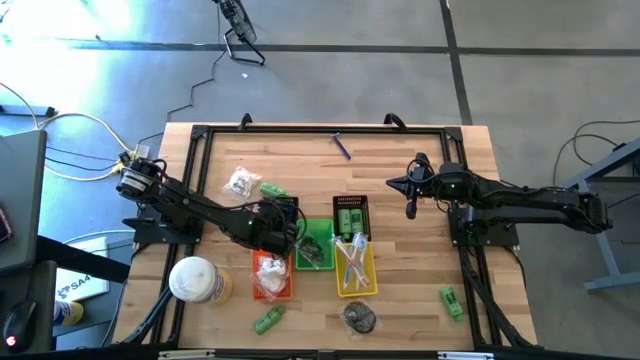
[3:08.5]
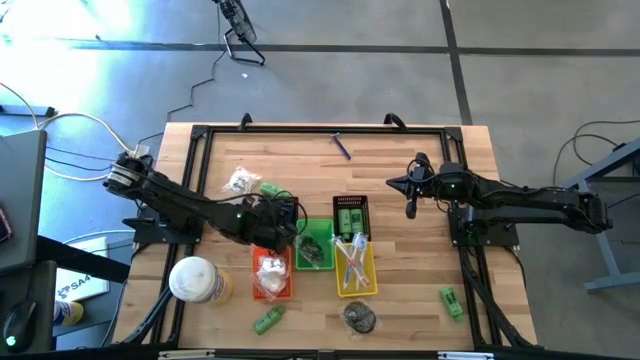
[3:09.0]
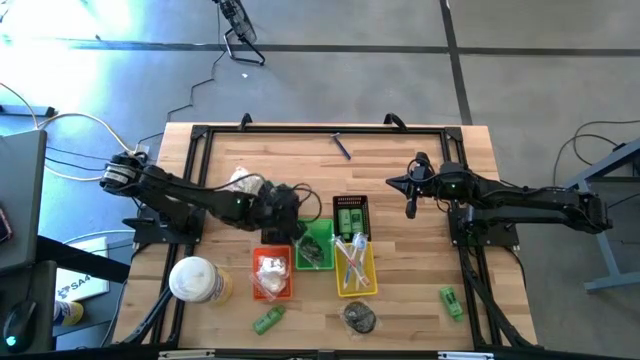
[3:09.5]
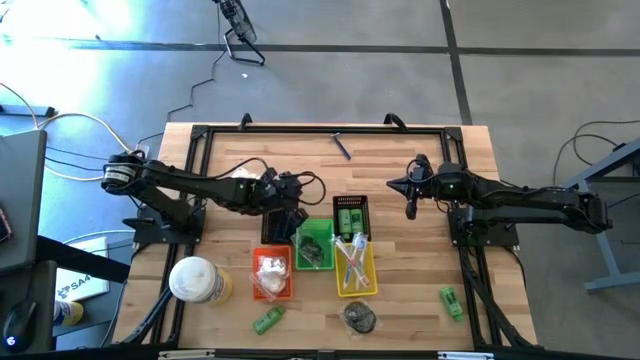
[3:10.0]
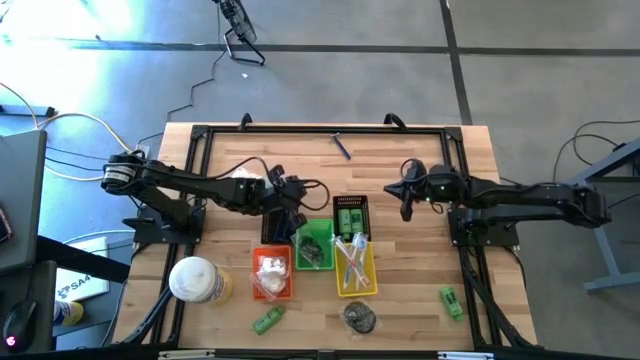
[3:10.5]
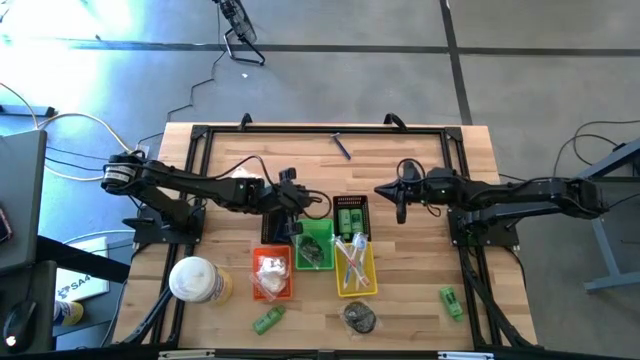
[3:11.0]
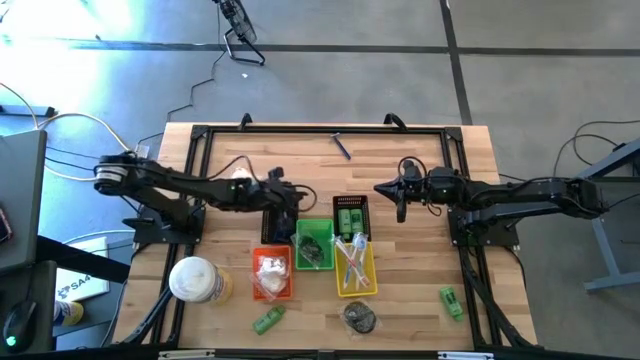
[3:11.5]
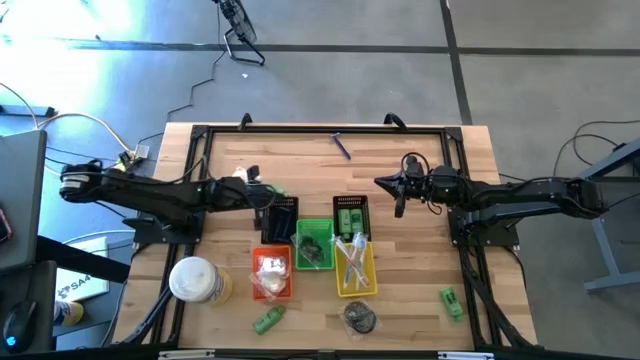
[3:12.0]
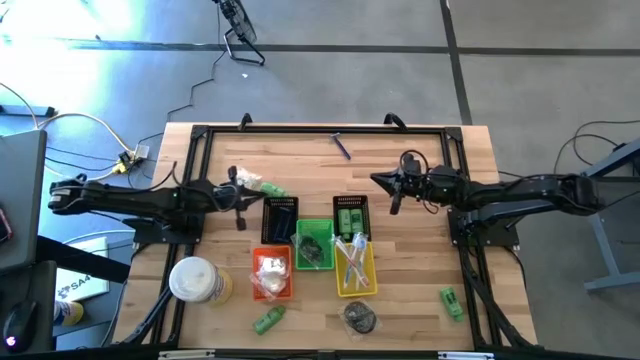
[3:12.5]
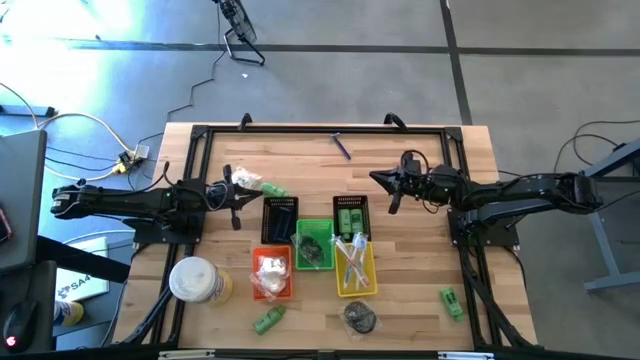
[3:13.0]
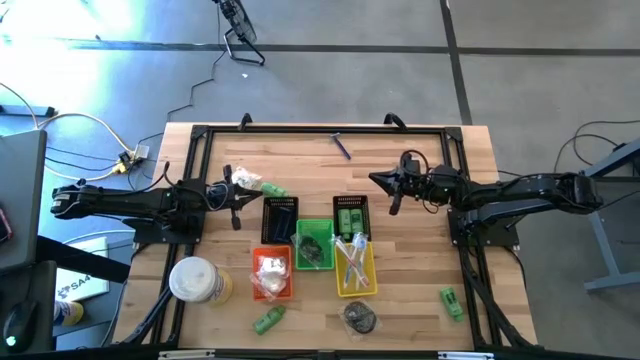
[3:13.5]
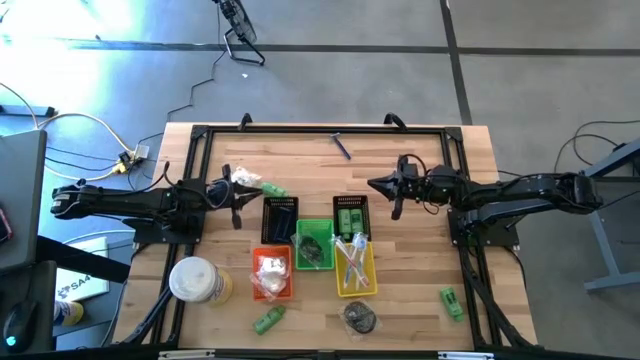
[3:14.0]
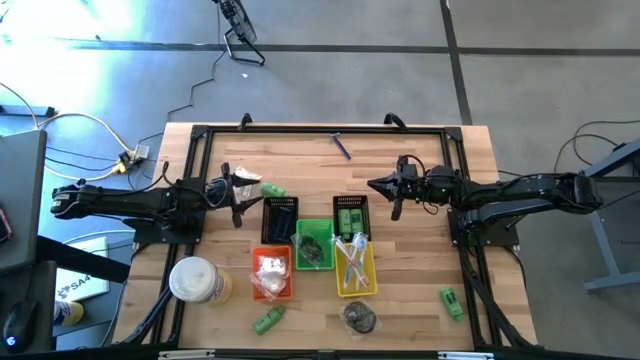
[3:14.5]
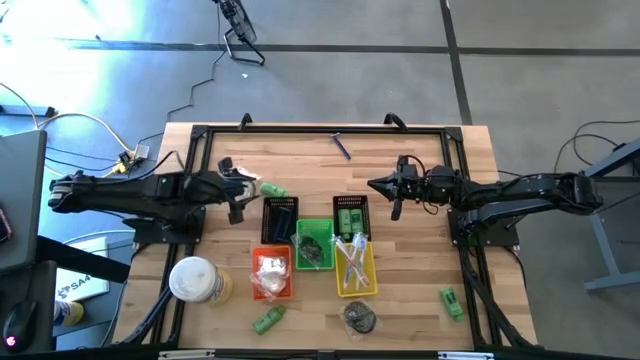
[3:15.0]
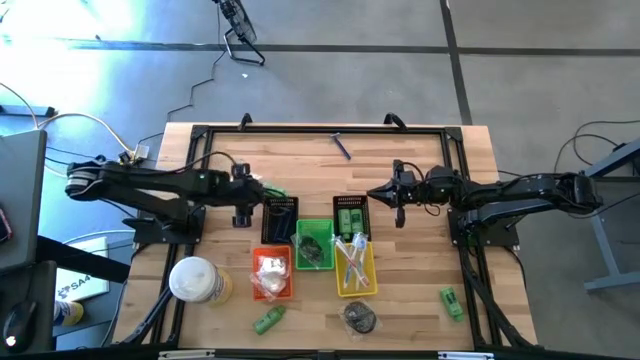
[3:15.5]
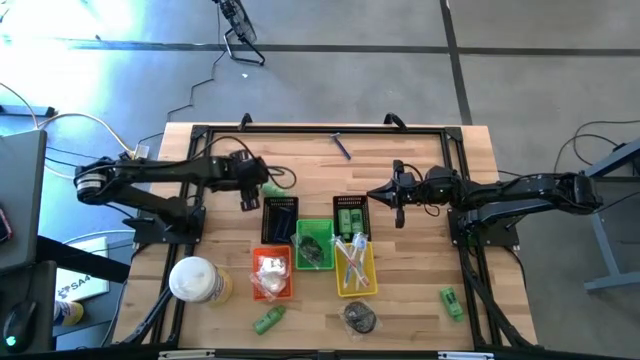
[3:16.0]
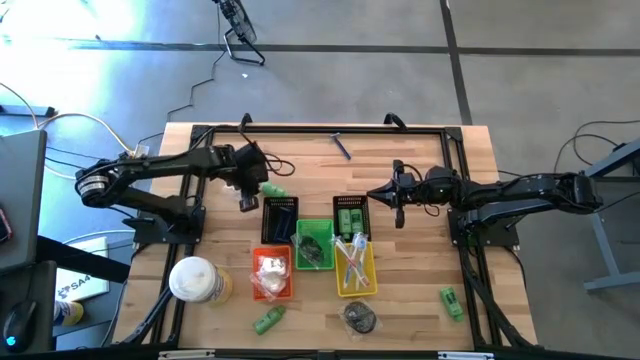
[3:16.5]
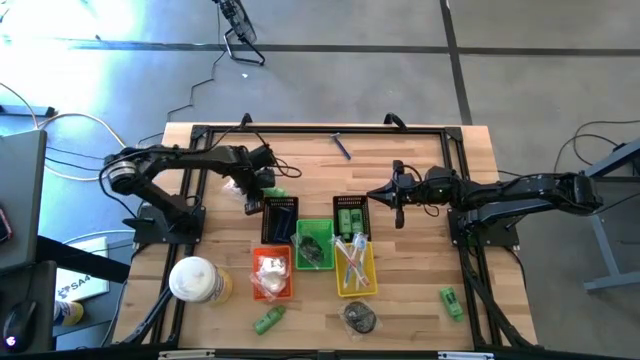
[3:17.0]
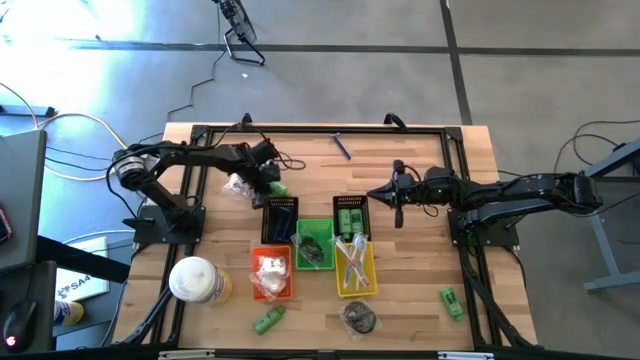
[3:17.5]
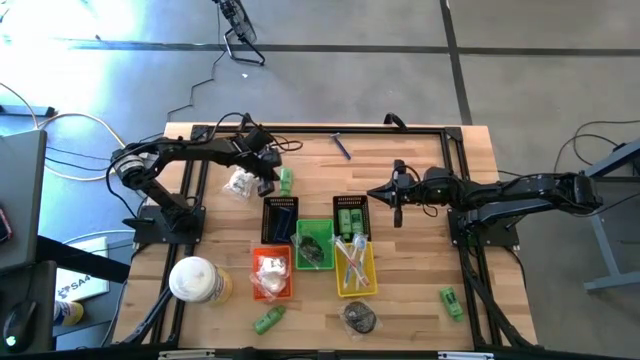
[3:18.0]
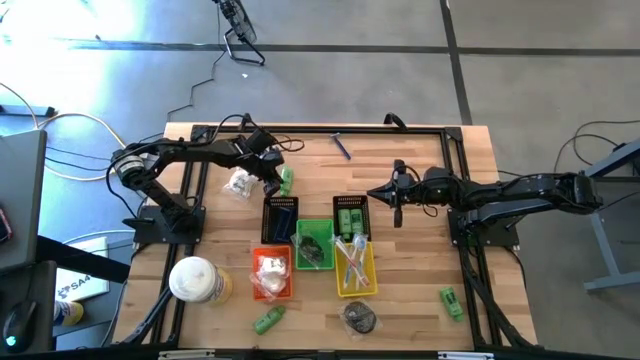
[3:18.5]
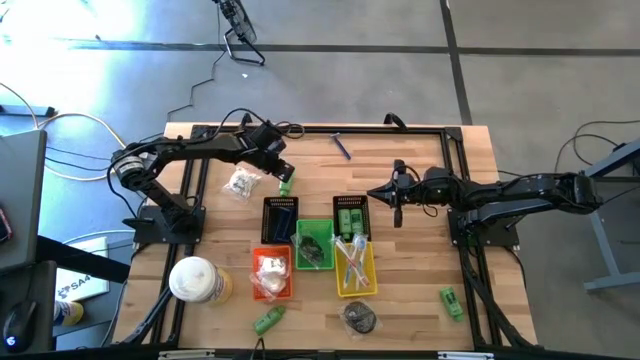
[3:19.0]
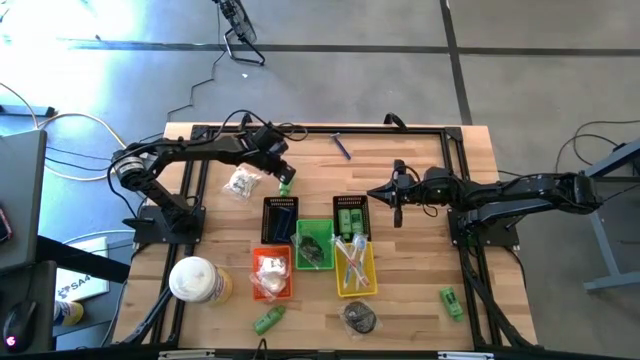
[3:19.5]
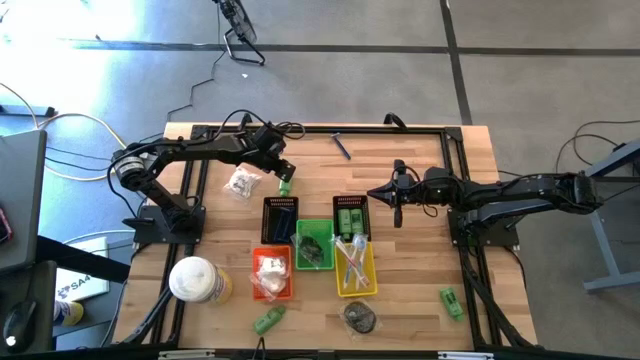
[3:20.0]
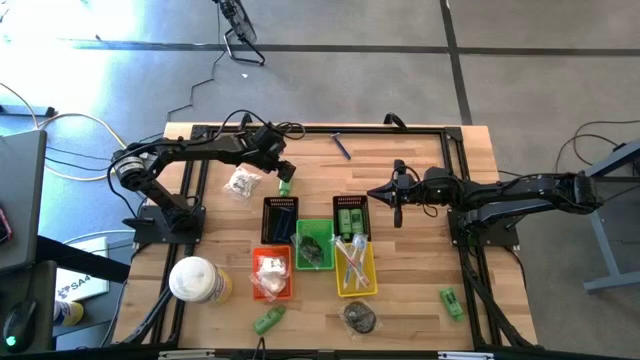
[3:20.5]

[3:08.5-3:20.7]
Task: Pick & Place Travel size toiletries
Put the green shampoo into the right black bin

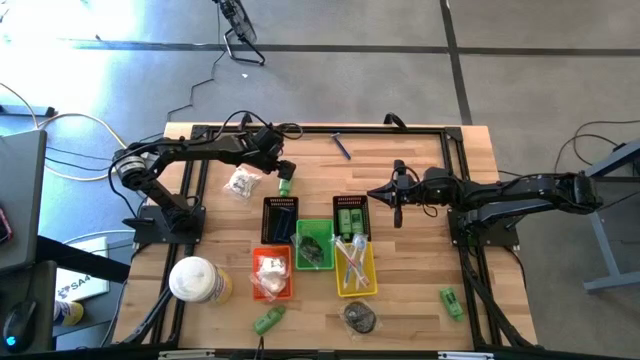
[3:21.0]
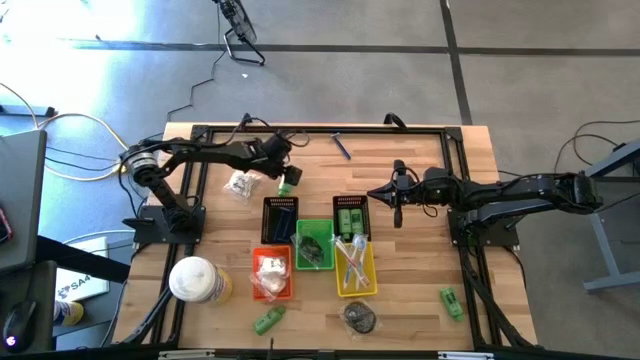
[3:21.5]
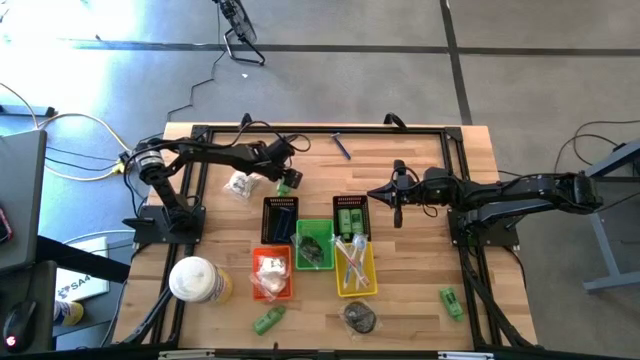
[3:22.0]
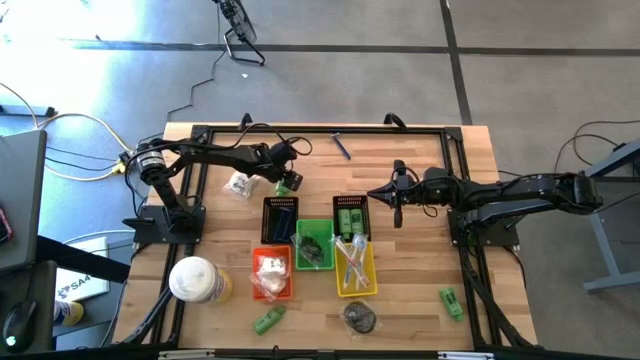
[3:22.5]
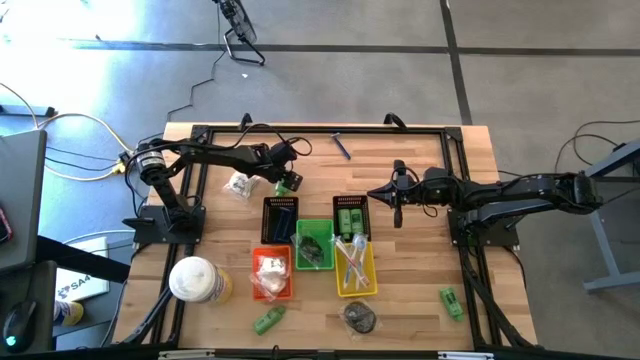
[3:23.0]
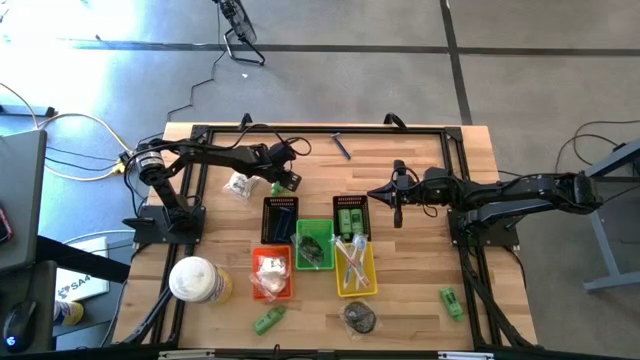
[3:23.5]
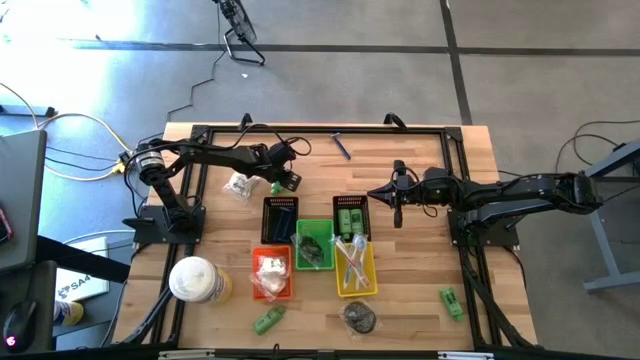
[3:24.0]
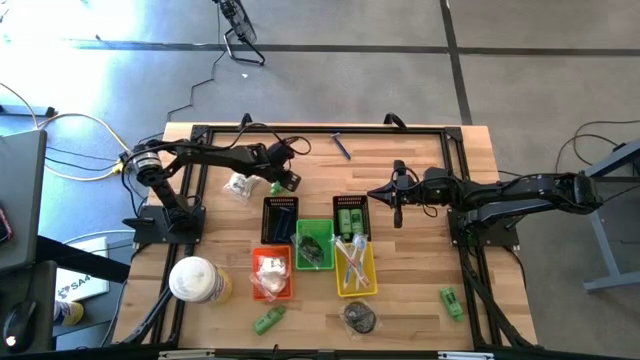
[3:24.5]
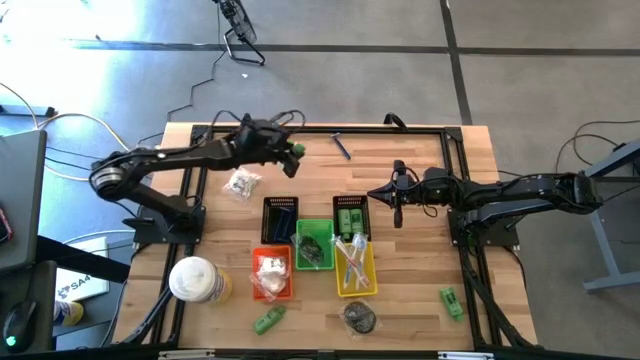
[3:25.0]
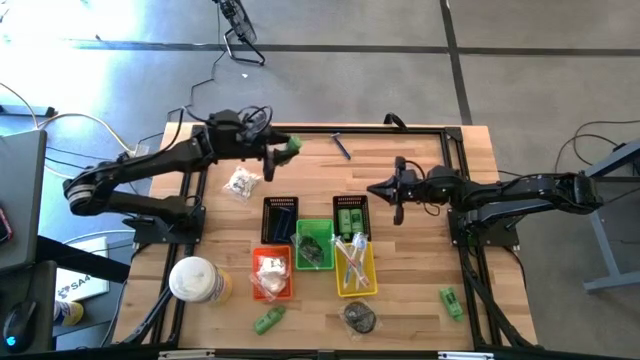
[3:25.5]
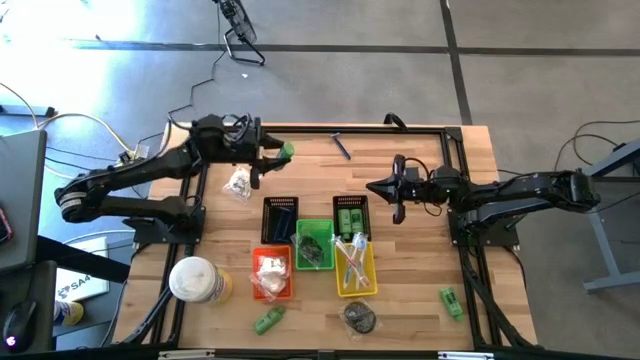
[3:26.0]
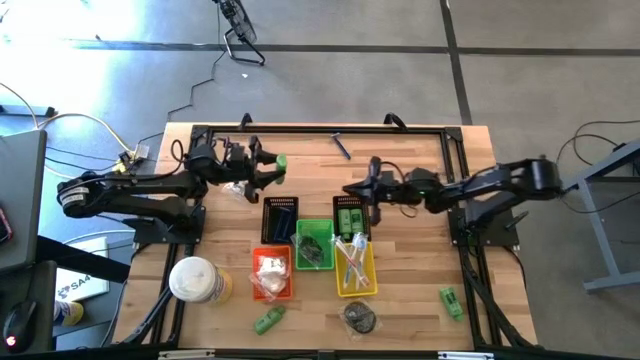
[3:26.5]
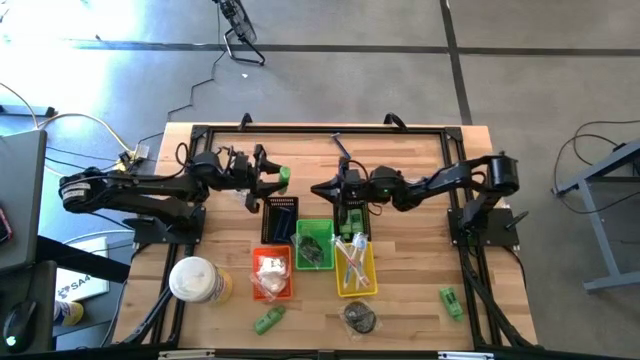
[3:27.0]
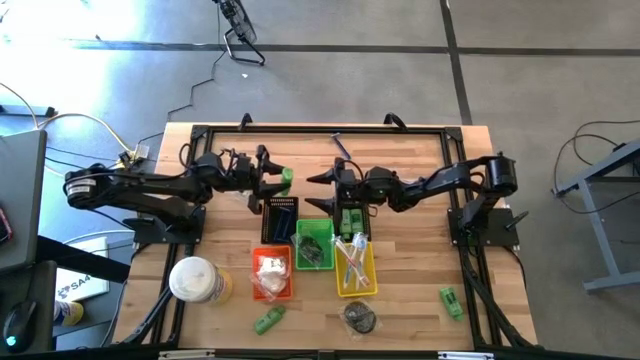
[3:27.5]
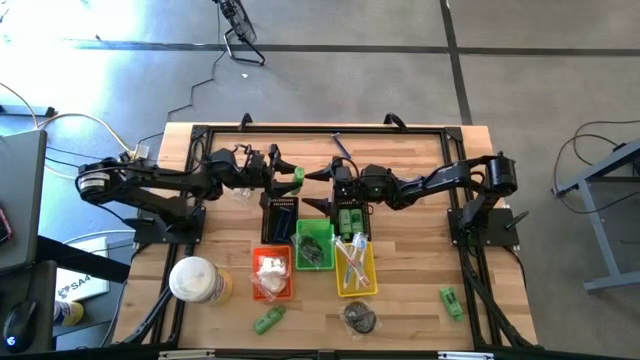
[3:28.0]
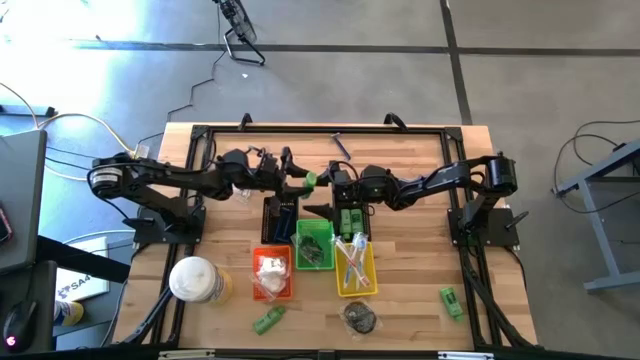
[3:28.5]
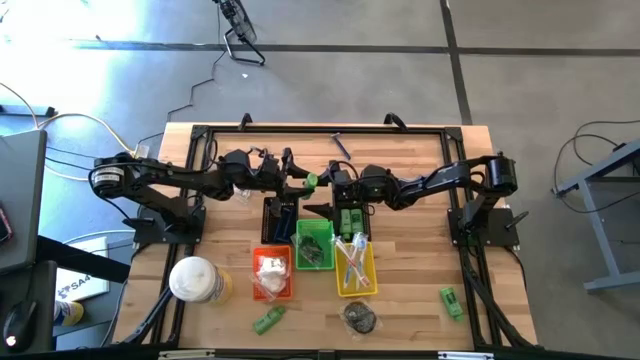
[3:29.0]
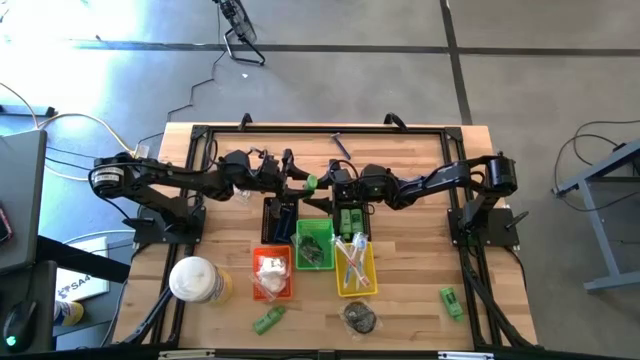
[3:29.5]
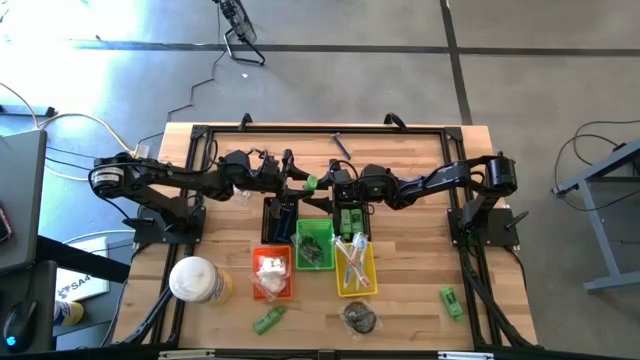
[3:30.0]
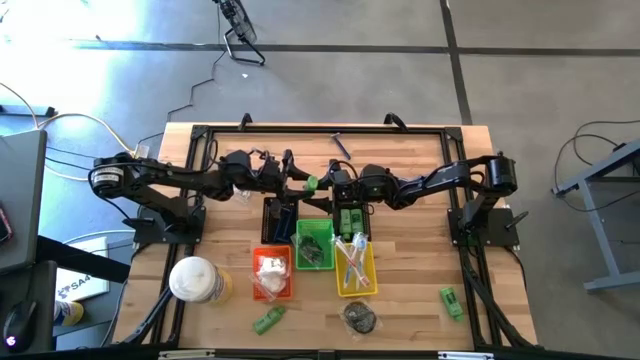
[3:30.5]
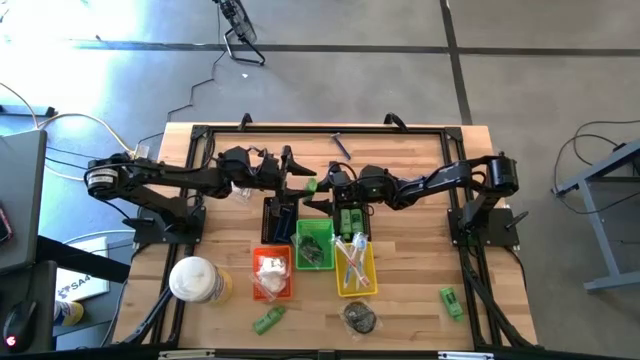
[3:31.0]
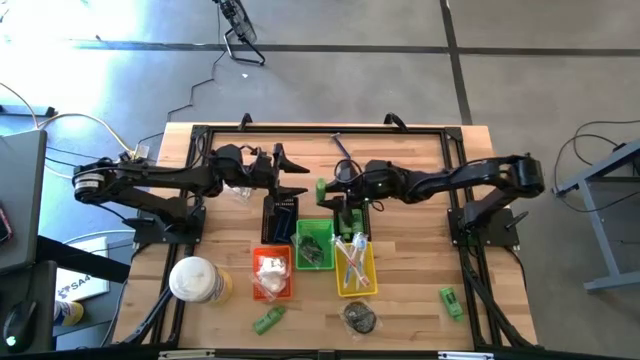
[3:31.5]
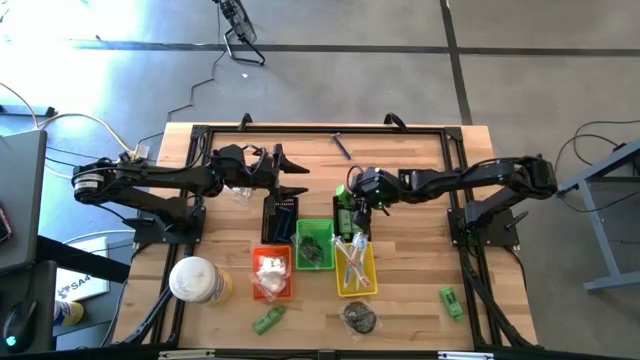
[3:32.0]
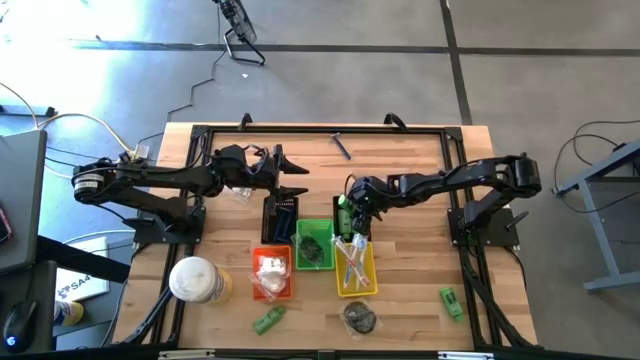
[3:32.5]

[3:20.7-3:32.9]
Put the green shampoo into the right black bin
